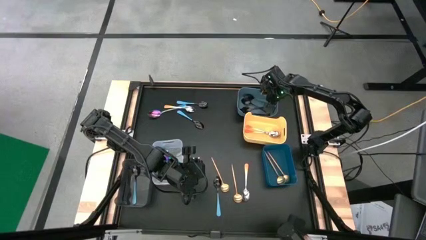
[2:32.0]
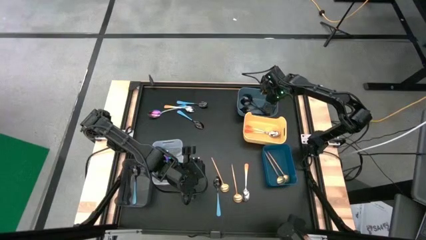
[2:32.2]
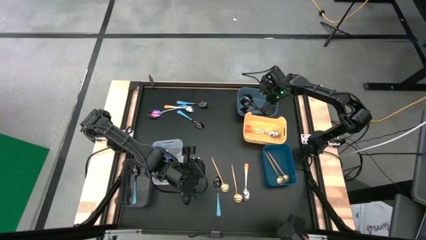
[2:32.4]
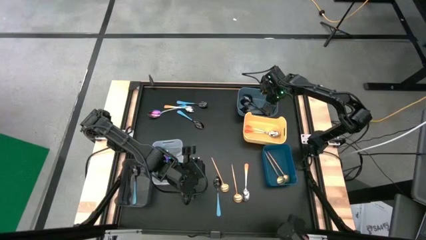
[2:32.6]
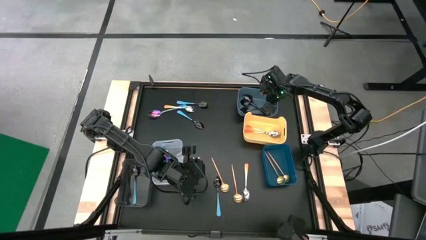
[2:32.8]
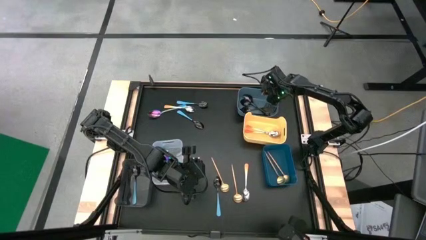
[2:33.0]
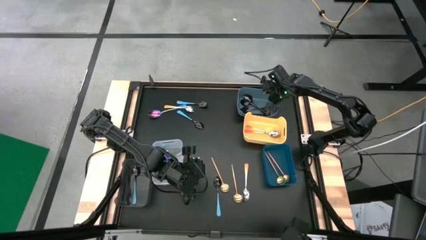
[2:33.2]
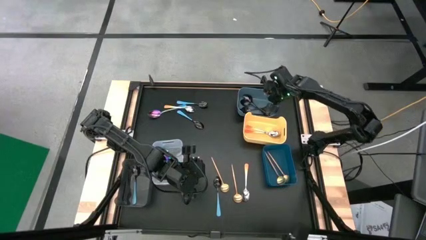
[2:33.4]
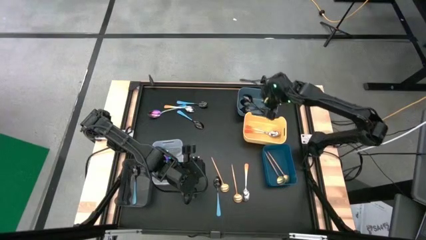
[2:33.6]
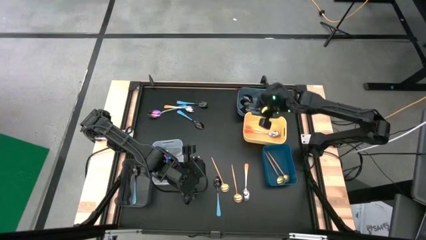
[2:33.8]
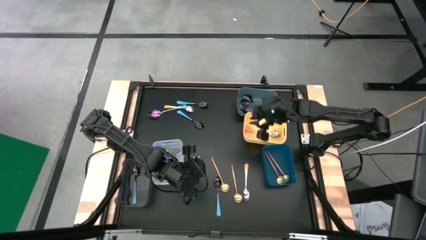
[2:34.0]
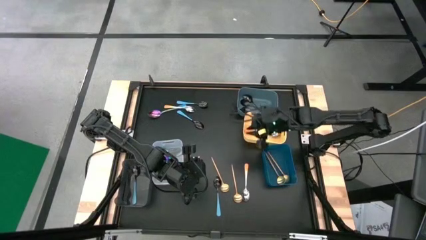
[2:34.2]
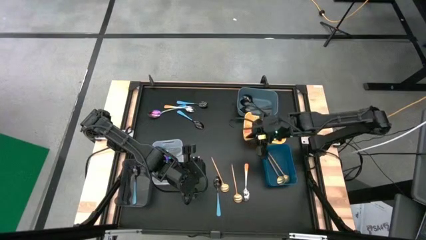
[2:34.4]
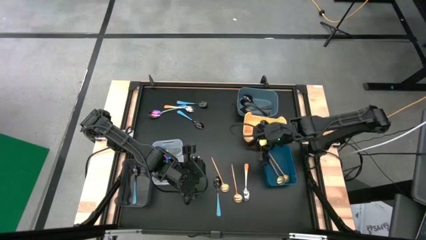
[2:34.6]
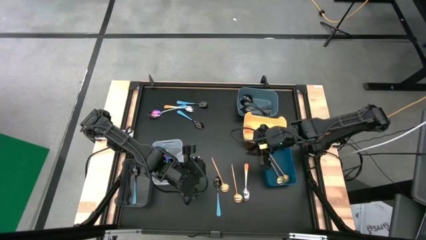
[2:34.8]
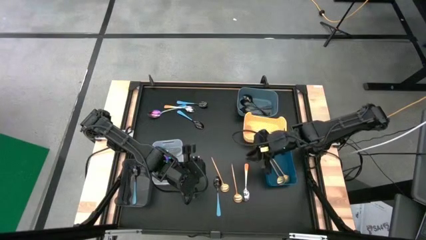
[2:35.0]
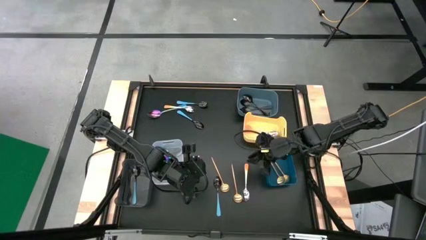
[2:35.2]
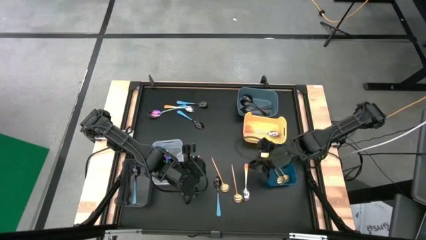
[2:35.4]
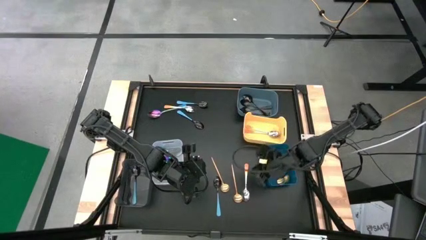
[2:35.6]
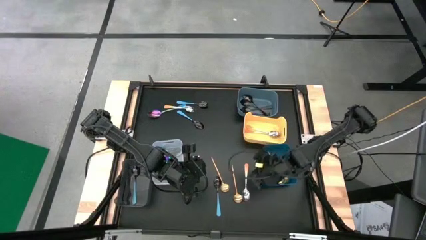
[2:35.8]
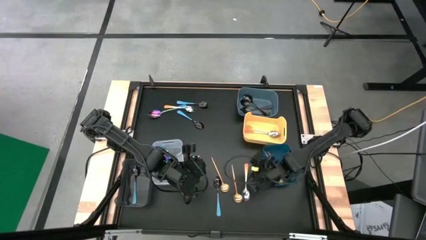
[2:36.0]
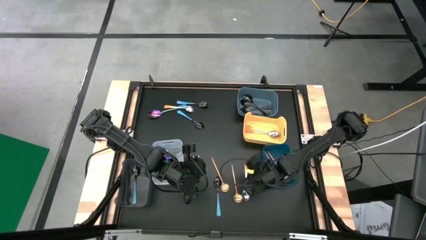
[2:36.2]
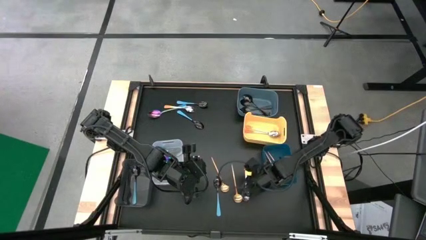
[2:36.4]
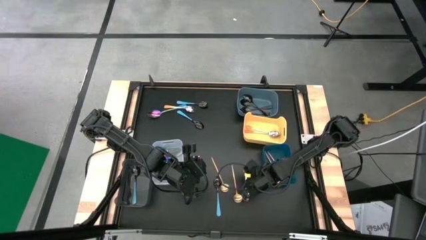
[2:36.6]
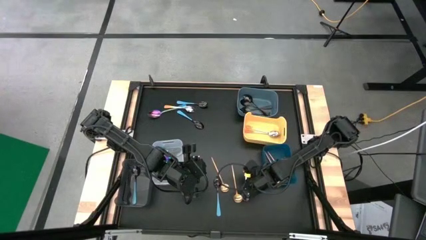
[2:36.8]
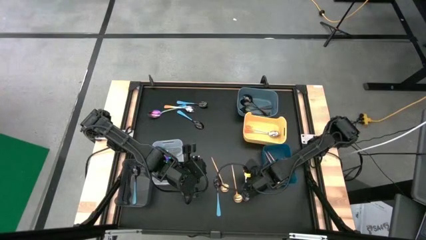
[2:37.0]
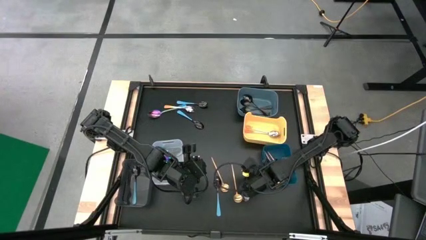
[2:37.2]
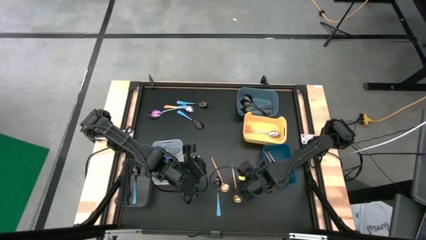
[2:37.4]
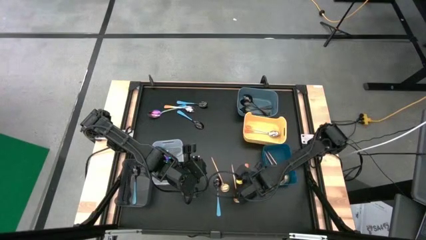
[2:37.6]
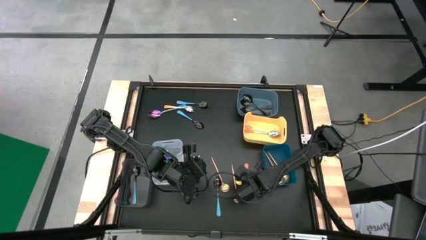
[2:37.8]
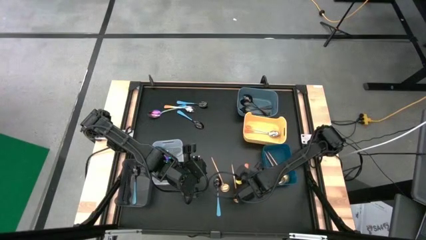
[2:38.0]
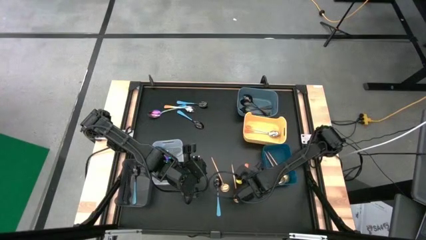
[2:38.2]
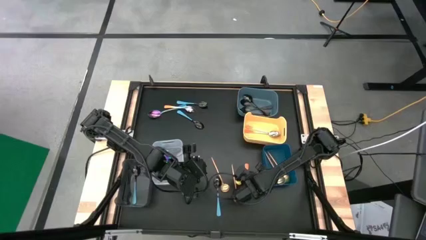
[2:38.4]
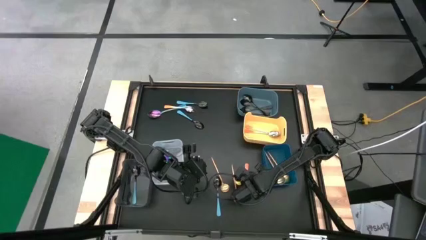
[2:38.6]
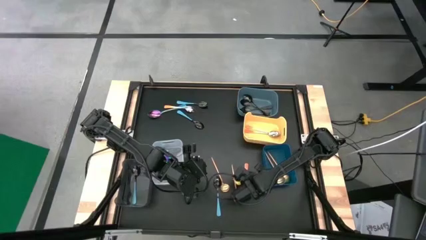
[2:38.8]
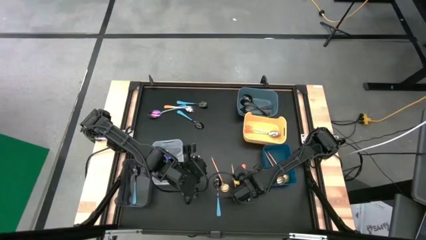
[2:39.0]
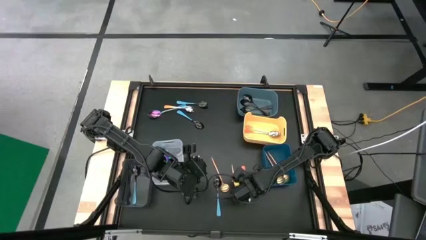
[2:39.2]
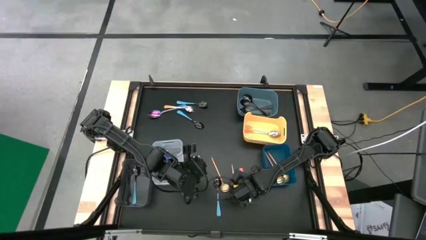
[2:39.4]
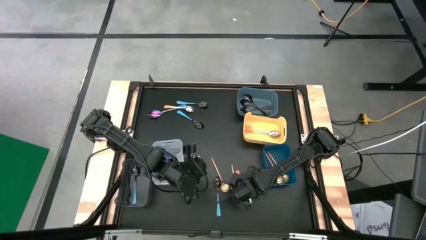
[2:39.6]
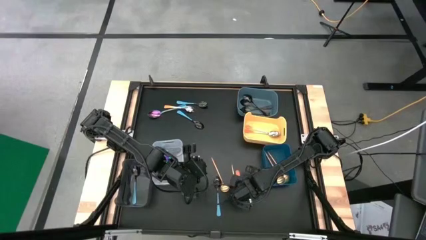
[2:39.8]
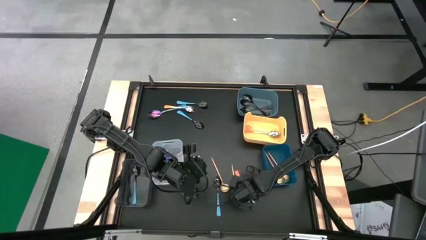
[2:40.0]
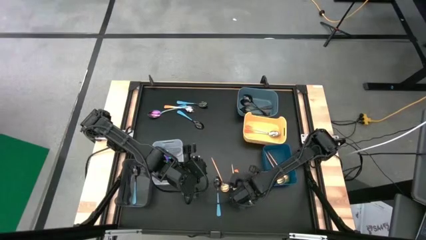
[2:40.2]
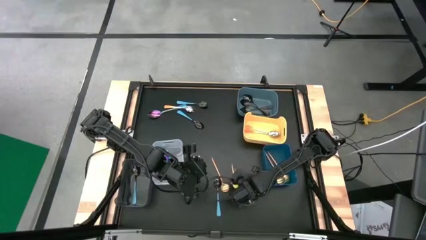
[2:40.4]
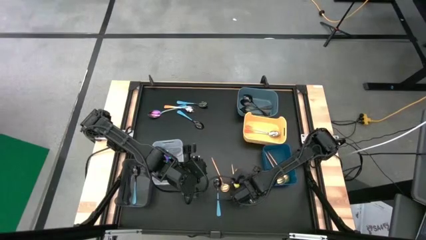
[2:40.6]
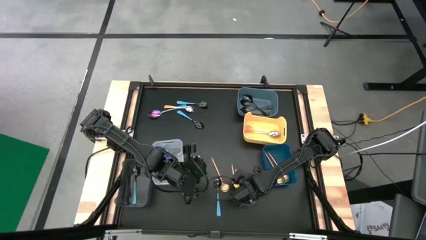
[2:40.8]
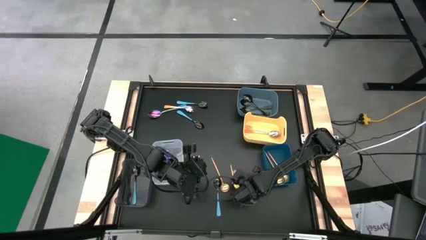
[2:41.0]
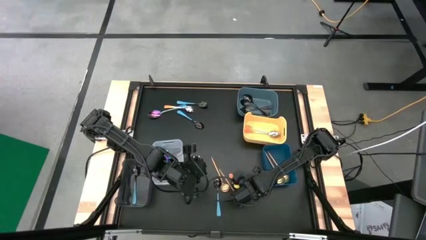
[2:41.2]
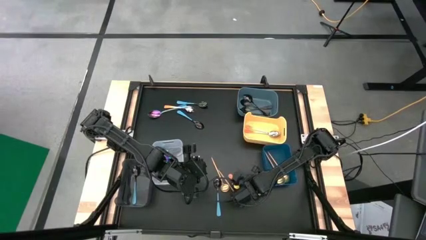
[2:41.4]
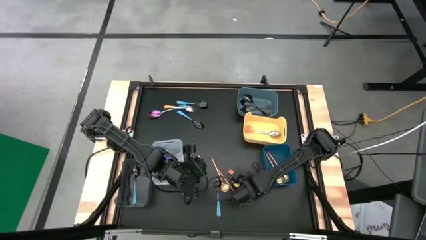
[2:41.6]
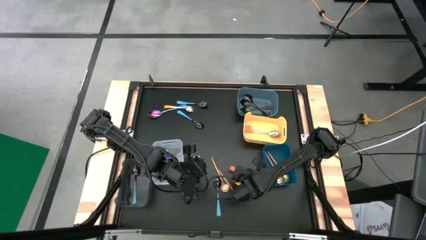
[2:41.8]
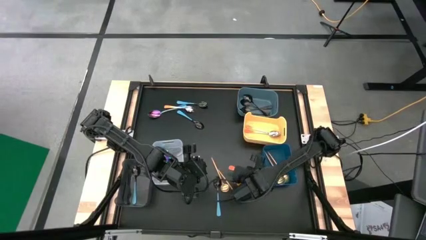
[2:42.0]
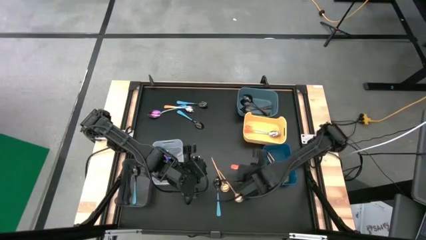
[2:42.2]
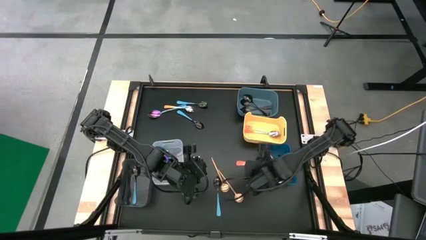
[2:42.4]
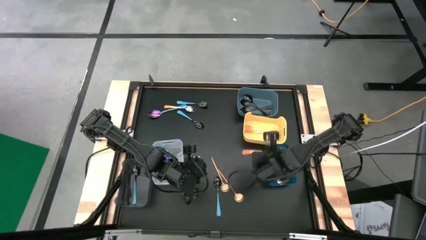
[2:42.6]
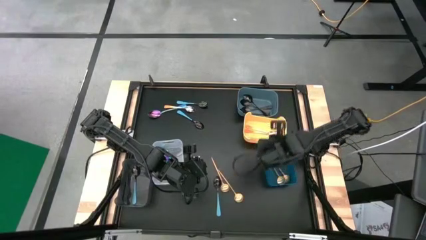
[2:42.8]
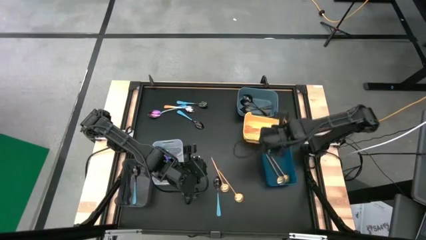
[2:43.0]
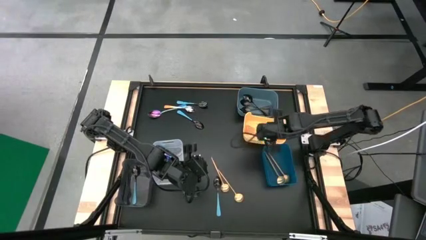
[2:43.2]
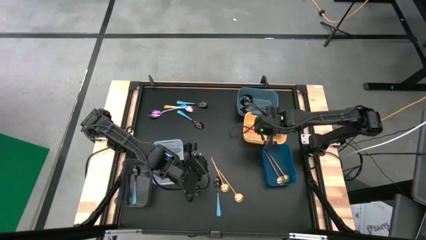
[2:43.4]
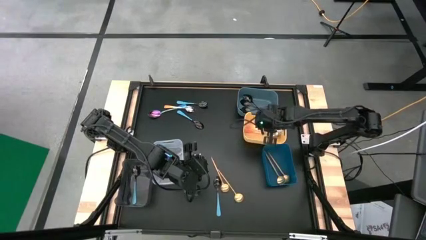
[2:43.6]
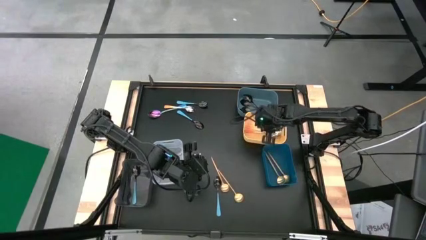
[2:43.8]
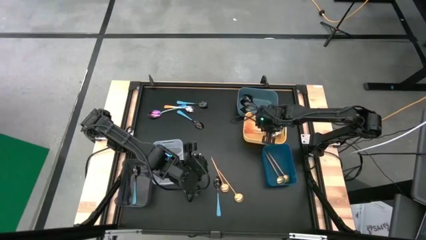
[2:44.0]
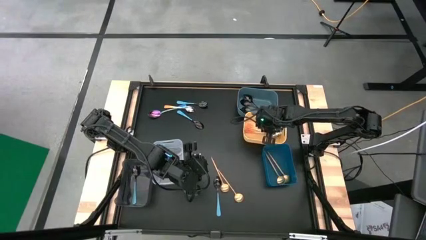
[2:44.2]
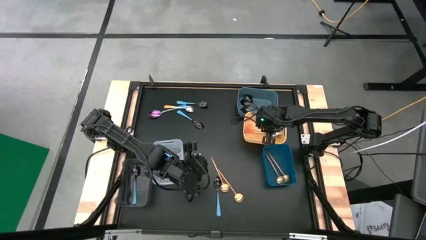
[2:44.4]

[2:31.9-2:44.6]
Task: Sort silverware by color (type)
Put the orange spoon into the yellow bin

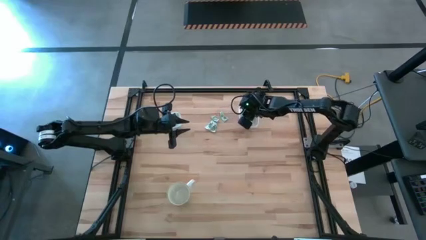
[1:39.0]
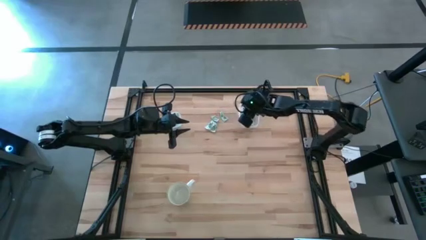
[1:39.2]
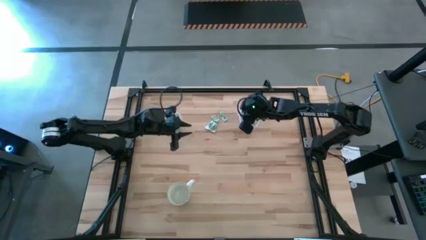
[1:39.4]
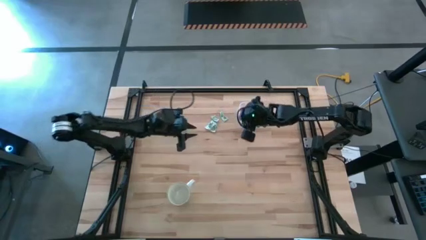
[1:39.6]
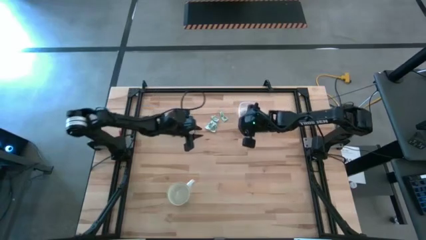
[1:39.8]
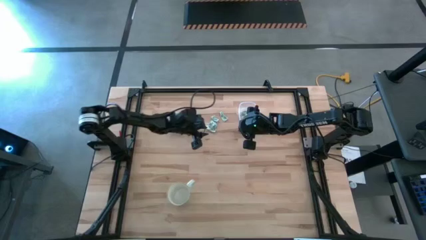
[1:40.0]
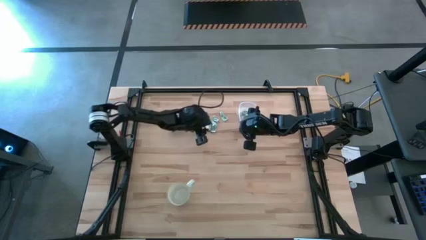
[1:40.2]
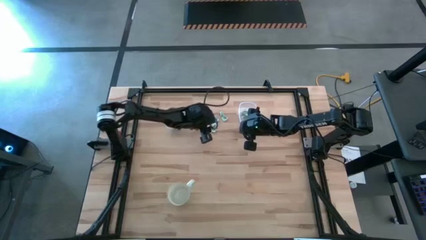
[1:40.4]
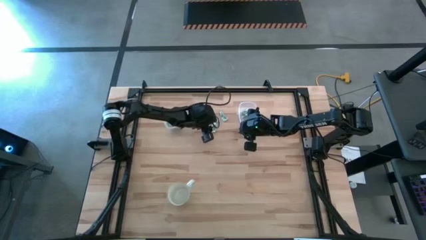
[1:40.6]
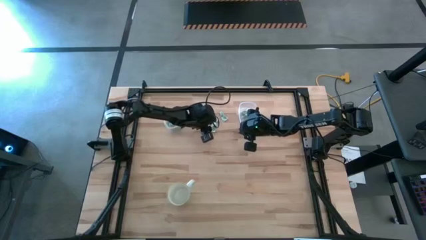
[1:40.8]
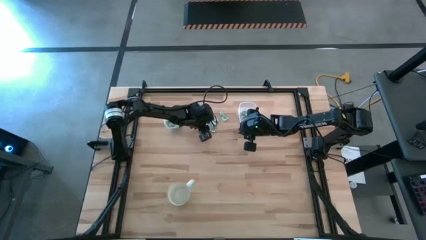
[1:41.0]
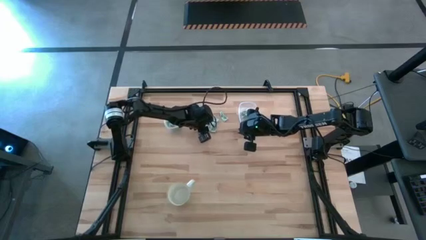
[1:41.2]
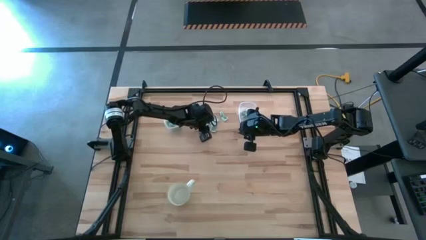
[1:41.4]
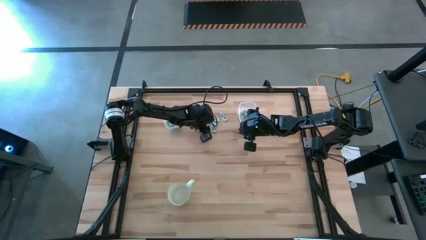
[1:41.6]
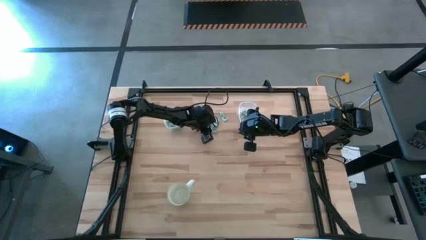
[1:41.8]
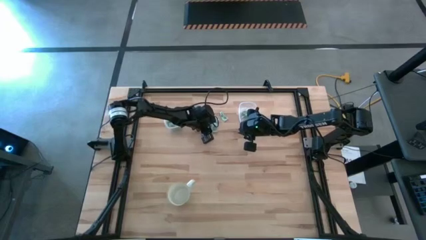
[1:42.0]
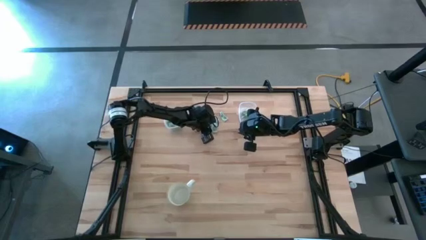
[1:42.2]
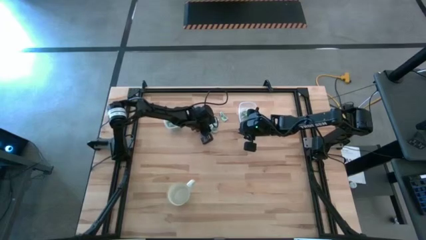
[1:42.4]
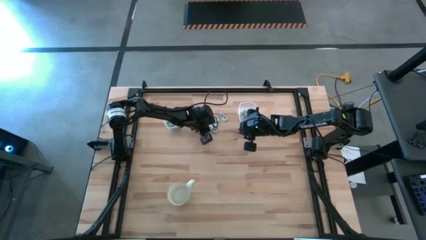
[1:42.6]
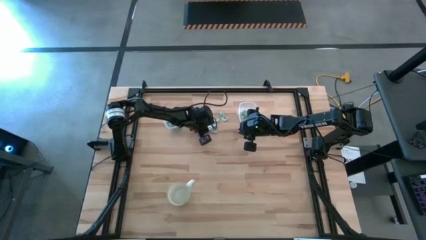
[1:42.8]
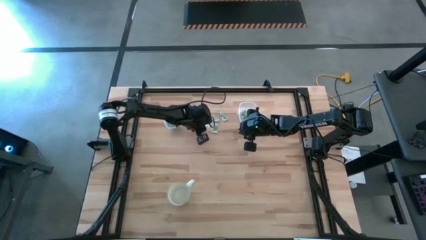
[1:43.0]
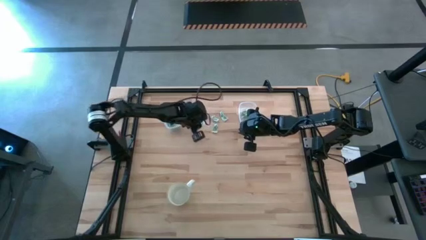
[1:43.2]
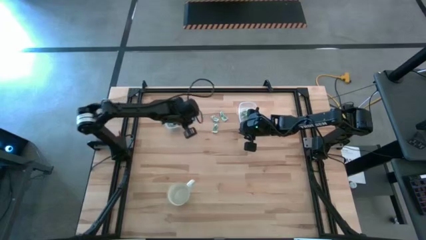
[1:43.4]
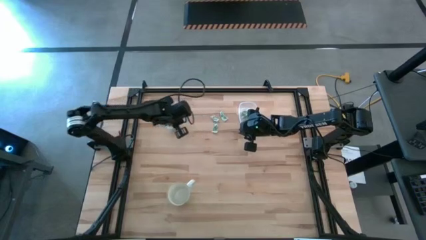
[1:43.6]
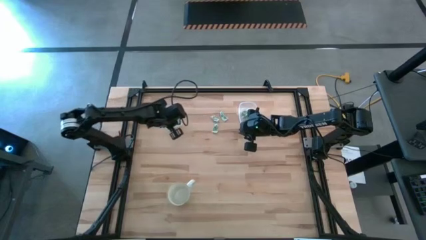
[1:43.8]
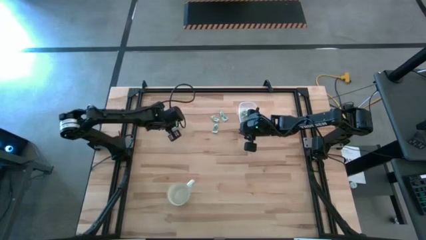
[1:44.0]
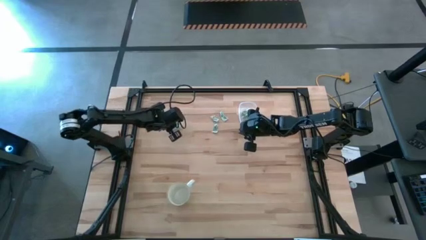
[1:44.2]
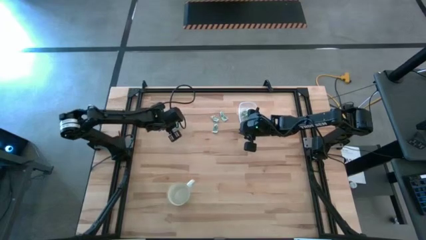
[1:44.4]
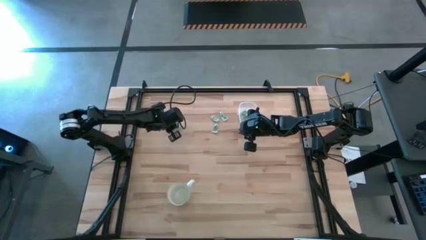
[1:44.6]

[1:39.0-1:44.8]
Task: Pick and place items into bin
Put the green stevia packet into the square transparent bin
